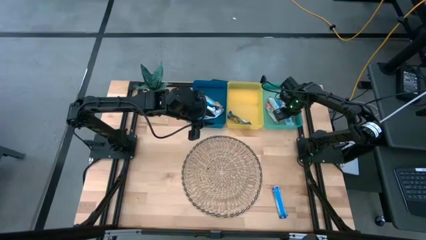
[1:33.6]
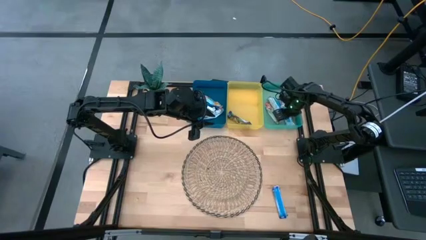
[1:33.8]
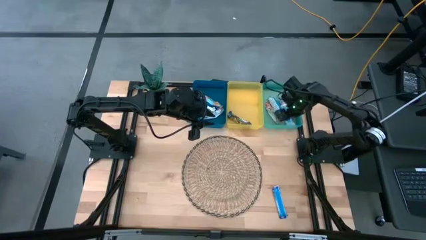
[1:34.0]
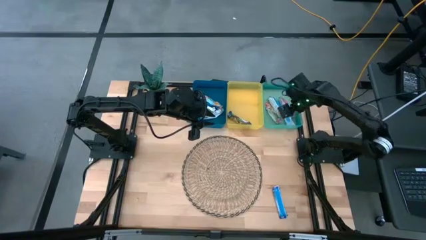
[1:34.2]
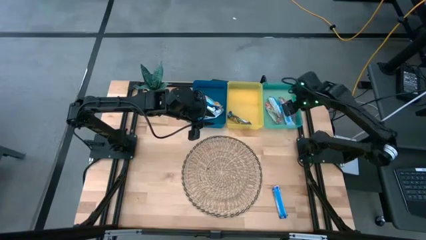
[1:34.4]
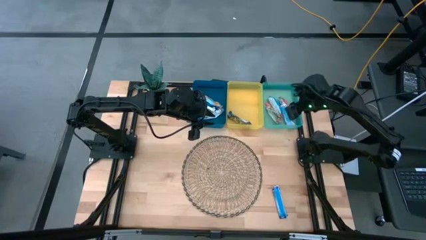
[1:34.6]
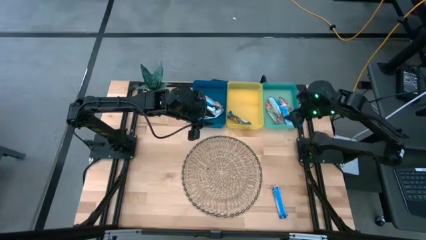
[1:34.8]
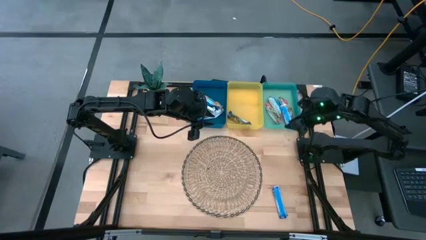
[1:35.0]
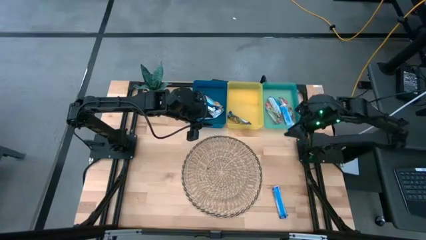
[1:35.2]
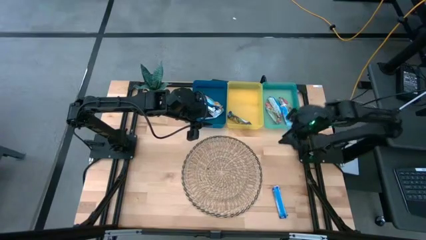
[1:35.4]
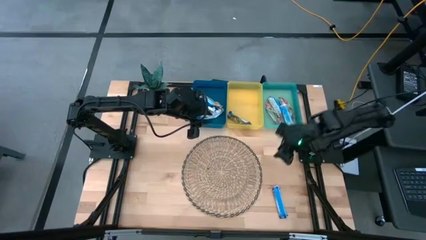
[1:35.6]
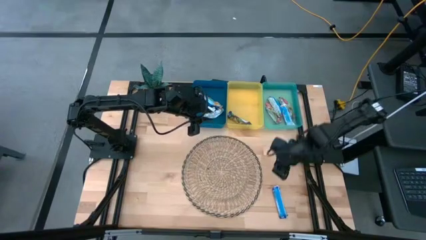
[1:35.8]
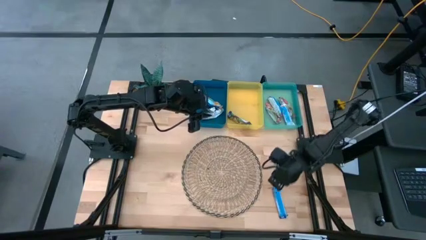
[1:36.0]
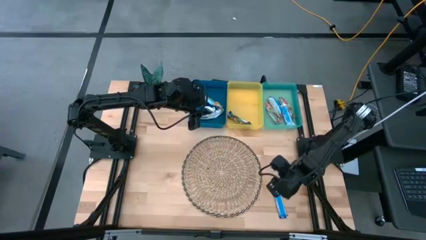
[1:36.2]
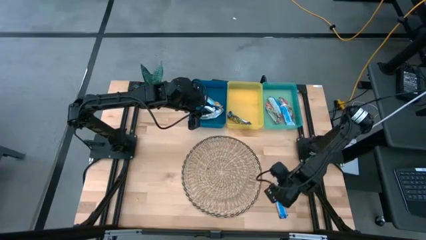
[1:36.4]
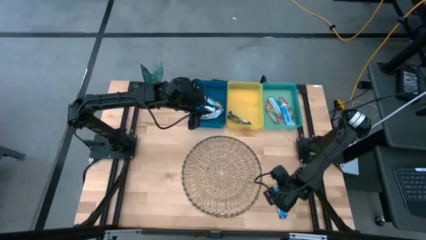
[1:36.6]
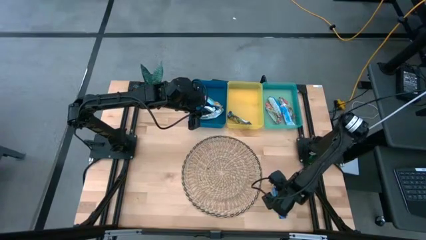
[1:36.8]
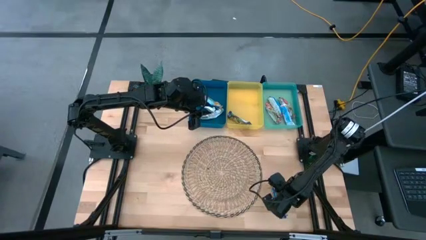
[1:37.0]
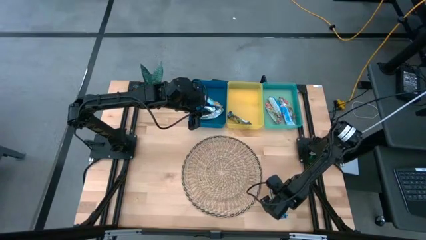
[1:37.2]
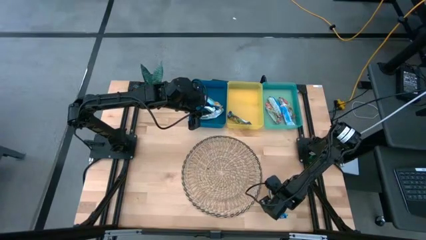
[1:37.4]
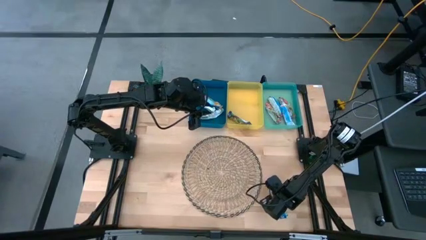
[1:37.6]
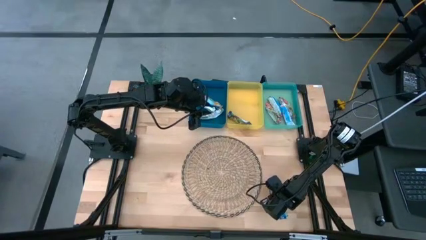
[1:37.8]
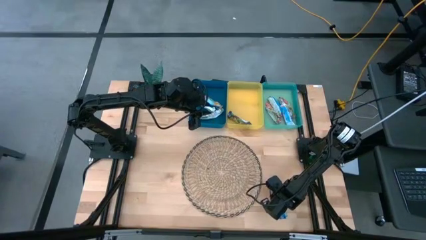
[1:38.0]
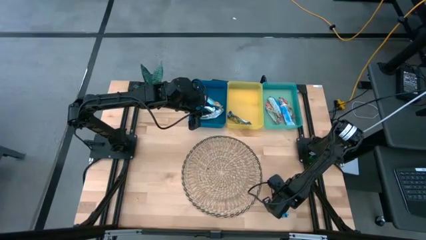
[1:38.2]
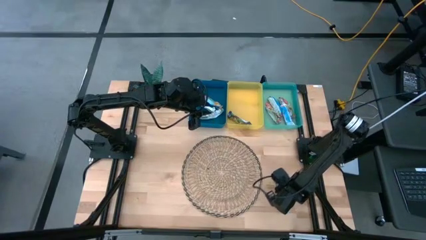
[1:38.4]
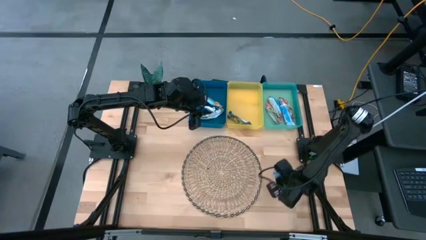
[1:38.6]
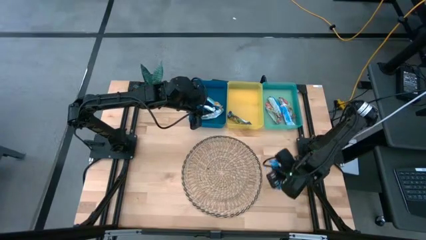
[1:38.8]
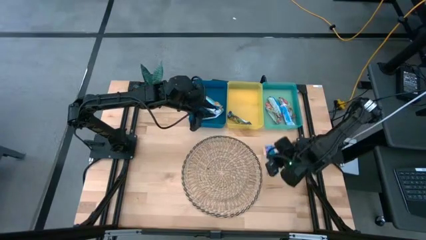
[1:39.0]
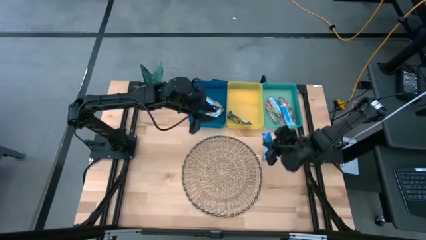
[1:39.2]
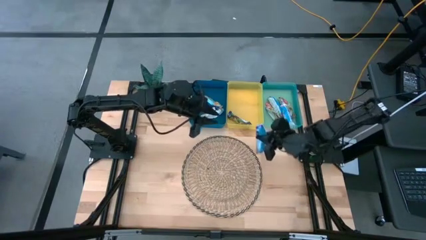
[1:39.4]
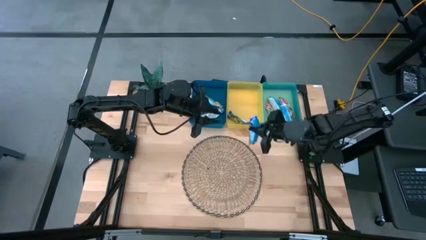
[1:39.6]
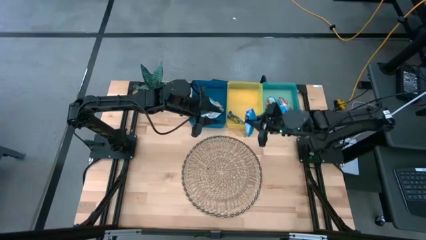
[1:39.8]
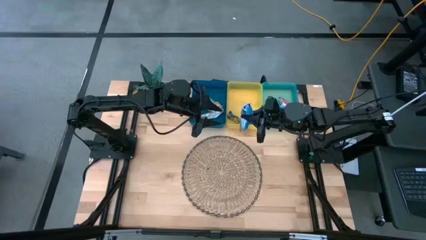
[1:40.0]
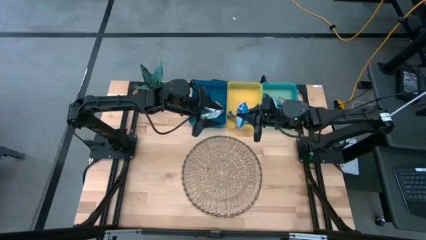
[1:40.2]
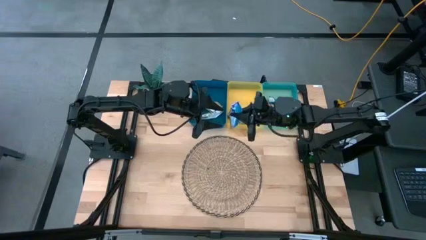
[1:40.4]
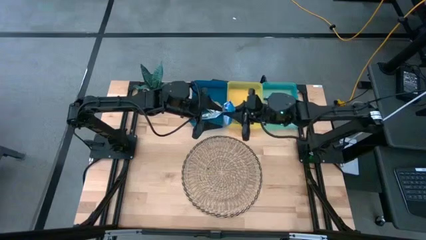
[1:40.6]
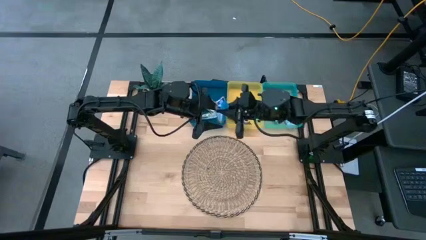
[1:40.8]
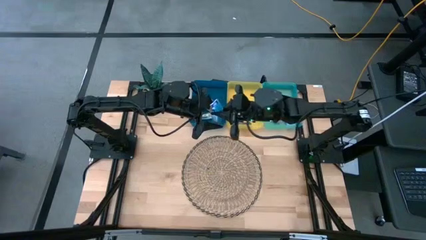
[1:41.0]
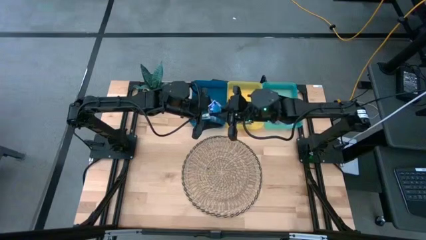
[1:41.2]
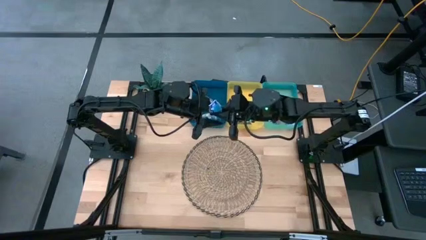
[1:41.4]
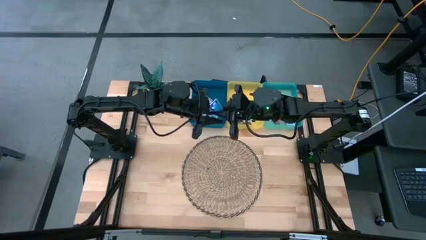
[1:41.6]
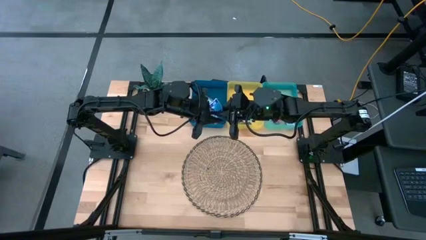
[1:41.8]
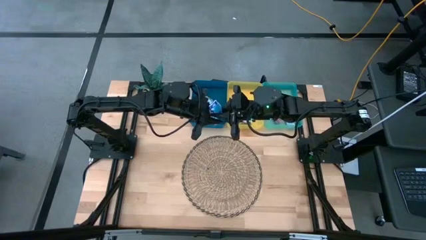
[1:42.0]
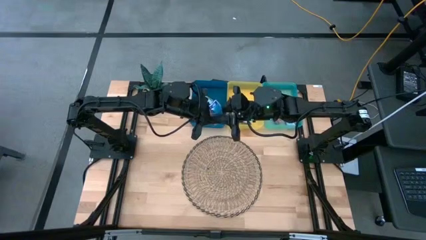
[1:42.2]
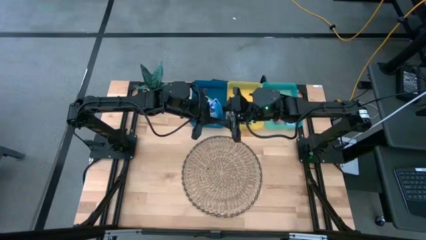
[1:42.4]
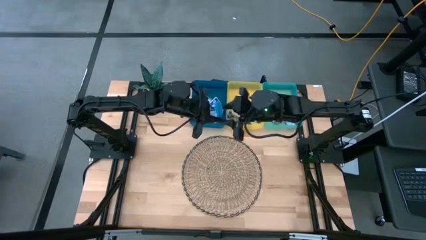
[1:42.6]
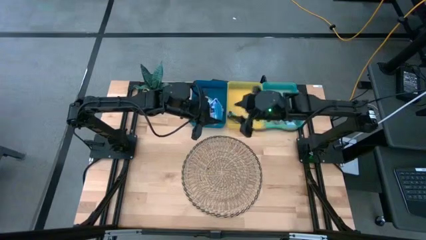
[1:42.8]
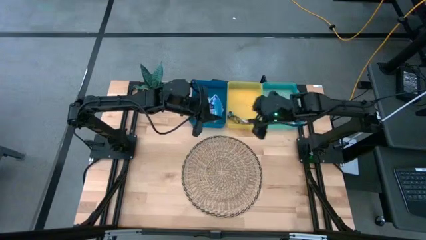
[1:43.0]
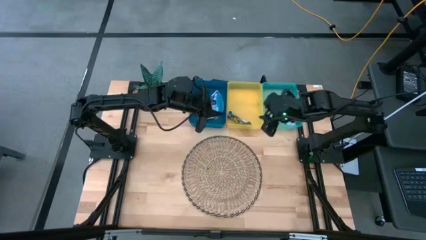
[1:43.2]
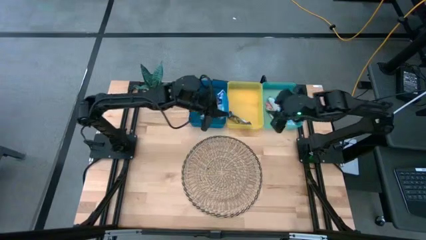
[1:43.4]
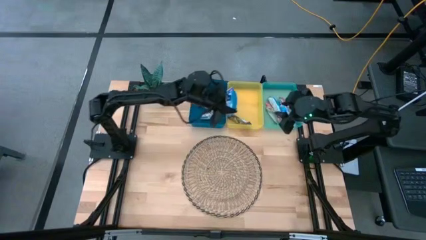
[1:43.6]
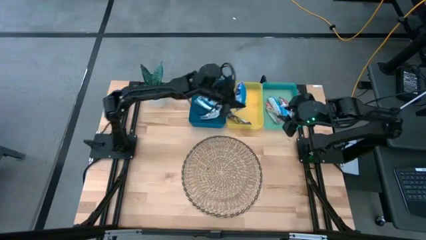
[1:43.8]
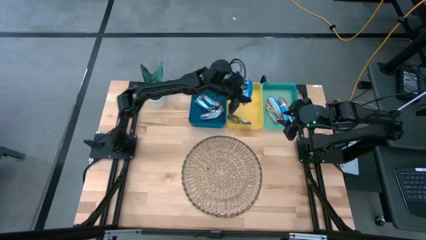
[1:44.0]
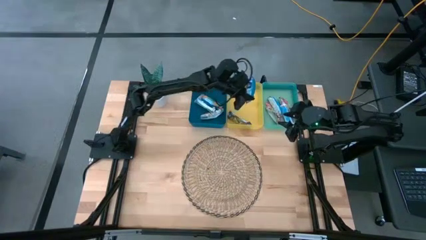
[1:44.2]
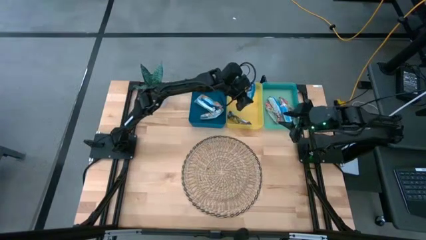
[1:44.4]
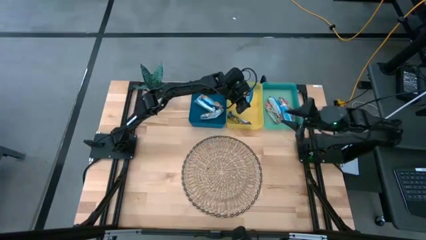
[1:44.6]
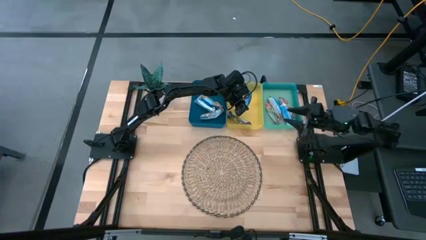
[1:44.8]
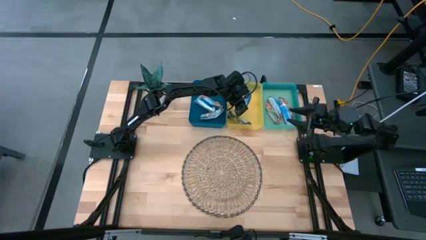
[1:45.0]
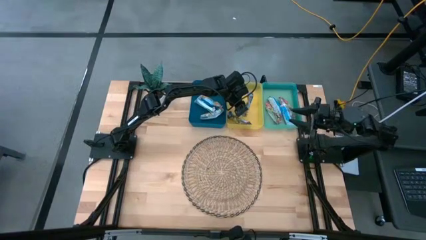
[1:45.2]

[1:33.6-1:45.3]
Task: Pick and place Granola Bars by type
Put the blue granola bar into the yellow bin

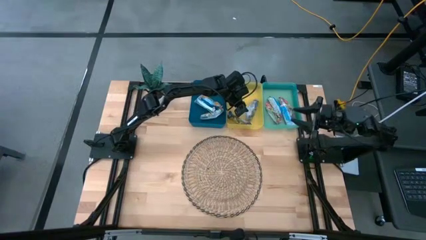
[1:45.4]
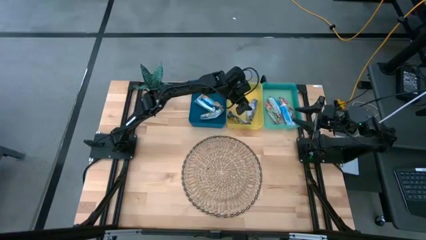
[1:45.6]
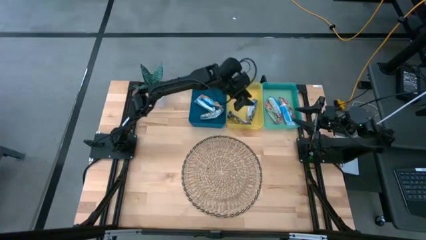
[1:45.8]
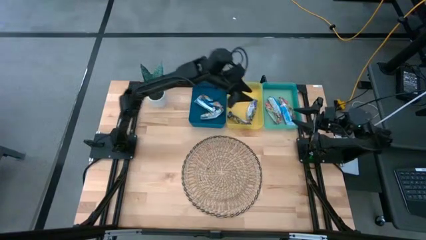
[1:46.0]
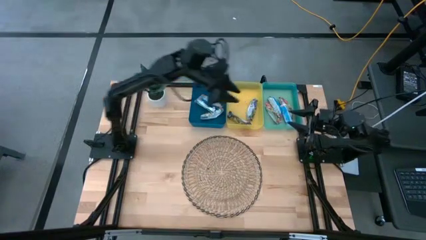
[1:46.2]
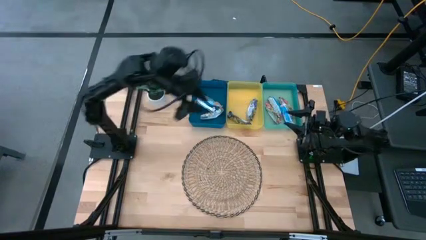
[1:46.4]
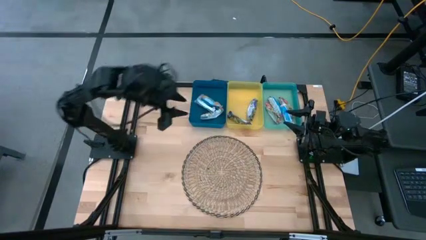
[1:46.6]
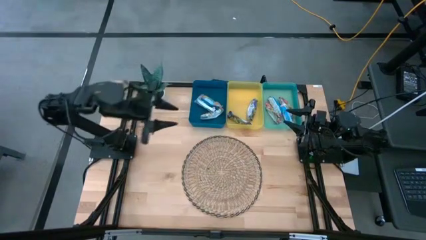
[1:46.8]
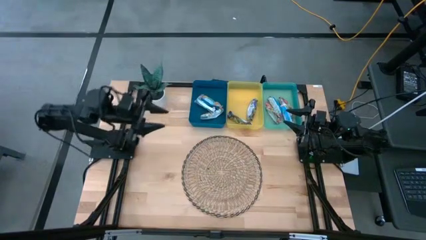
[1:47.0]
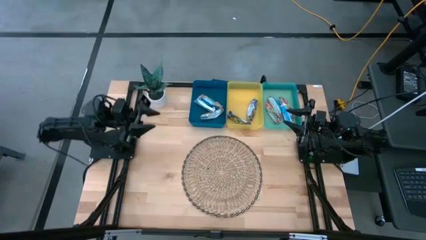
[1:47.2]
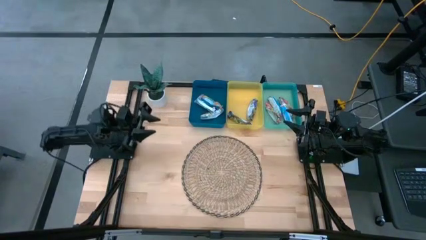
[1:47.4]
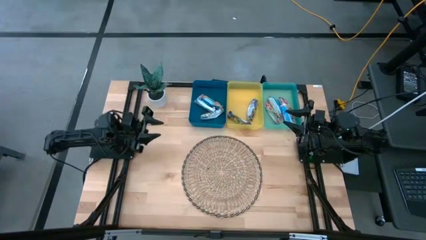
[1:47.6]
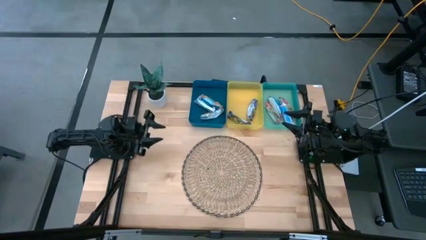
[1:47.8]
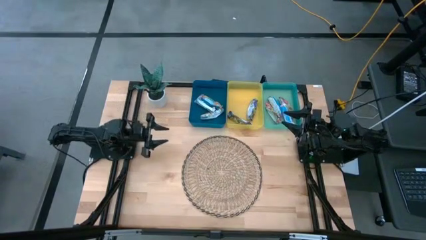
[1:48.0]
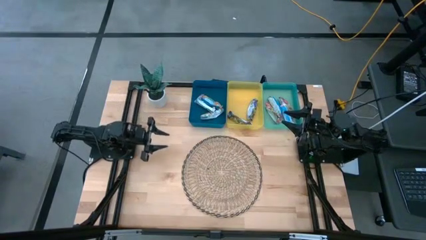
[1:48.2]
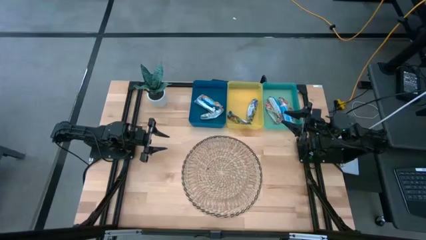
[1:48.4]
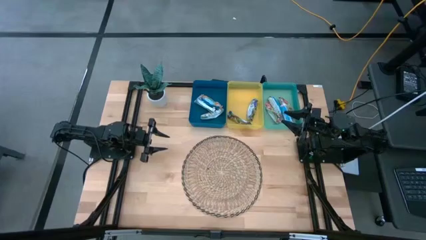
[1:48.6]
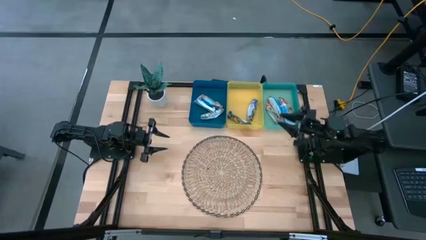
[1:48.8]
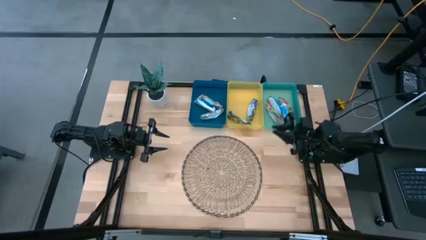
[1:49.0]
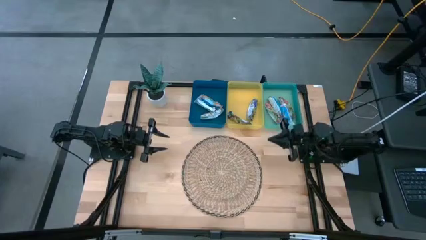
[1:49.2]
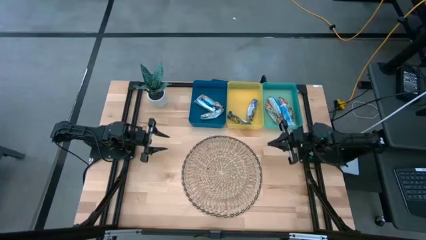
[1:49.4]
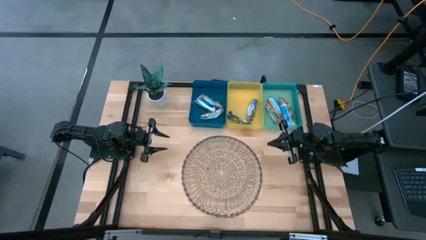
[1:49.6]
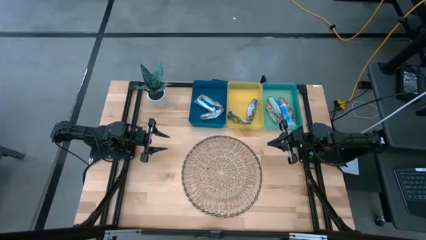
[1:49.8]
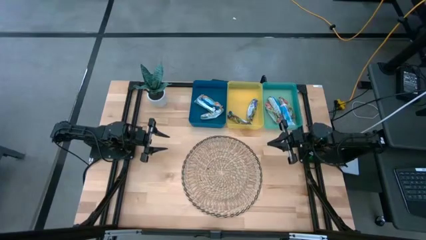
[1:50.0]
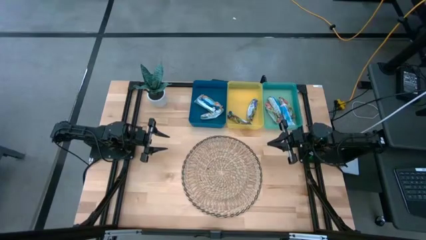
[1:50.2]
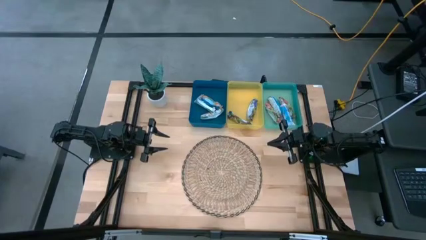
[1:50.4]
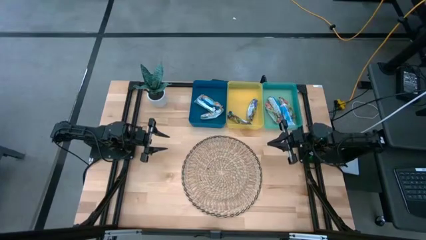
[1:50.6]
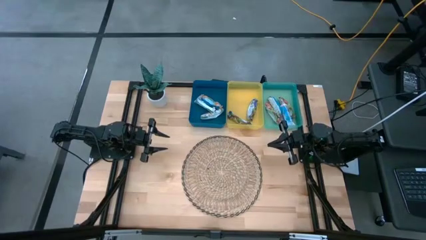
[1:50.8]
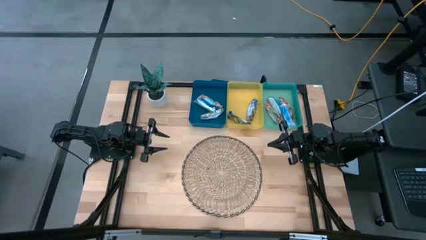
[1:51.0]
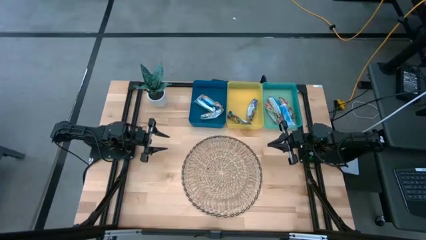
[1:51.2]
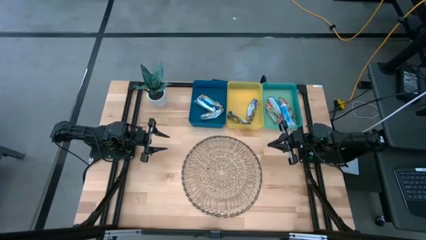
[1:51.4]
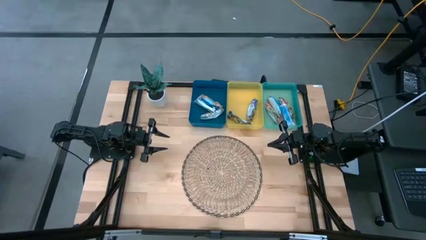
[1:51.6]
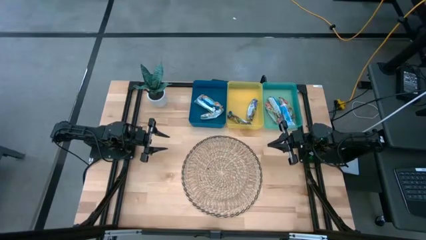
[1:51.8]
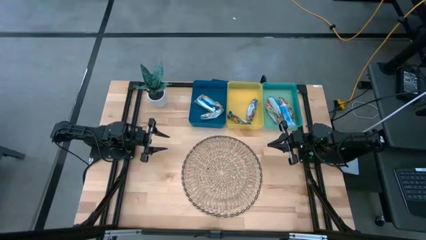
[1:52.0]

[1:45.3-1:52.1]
Return to Home Position
